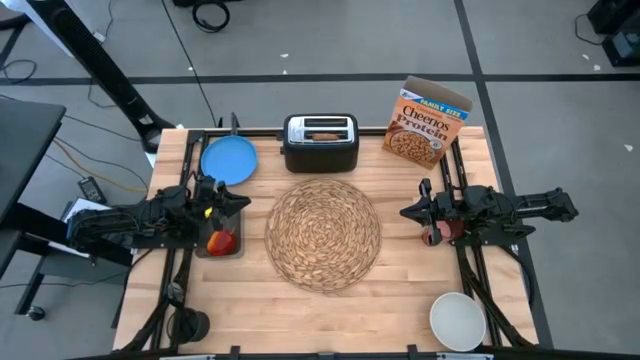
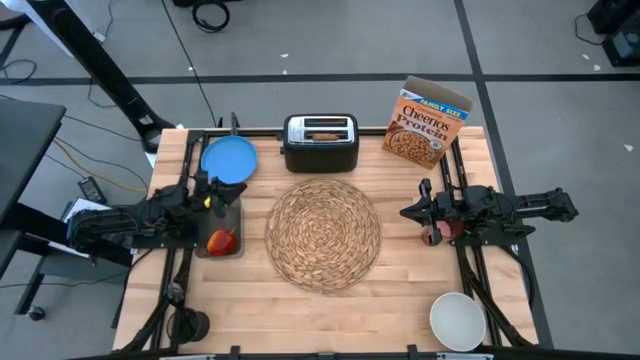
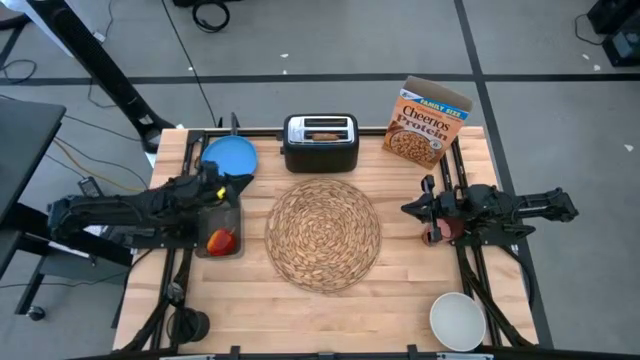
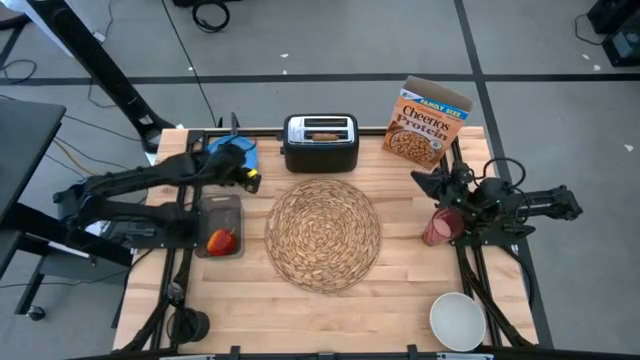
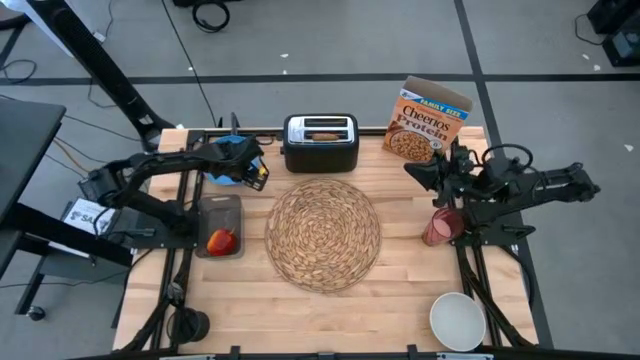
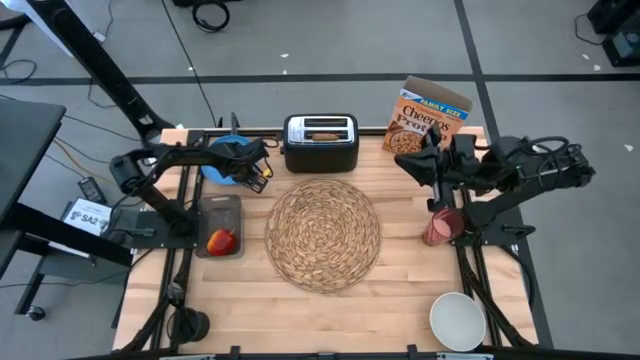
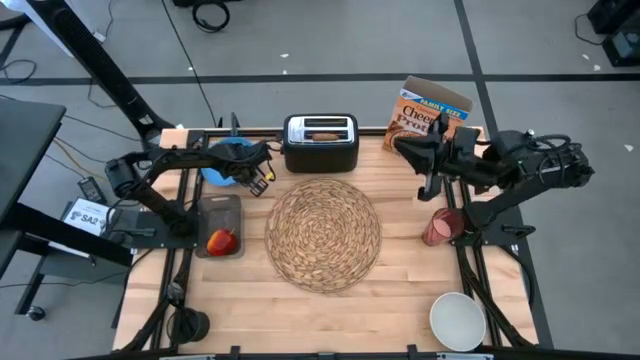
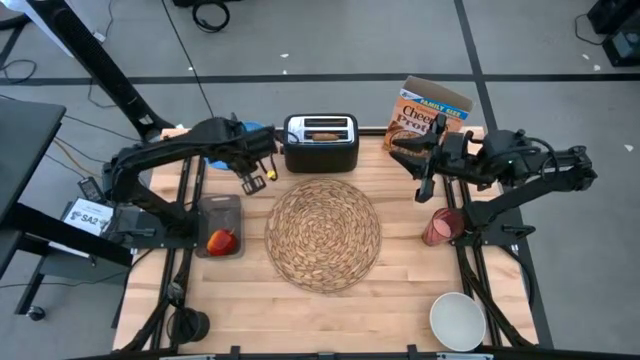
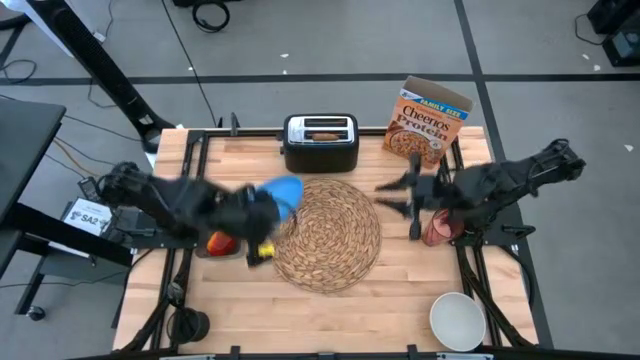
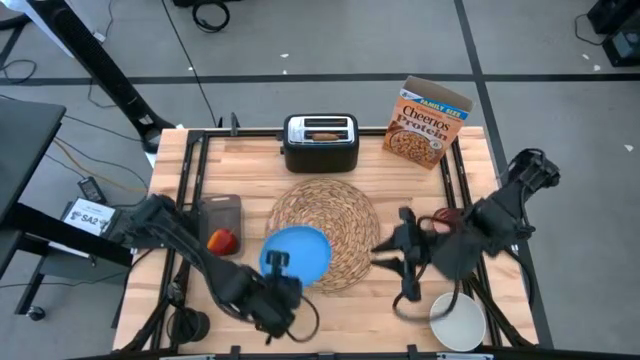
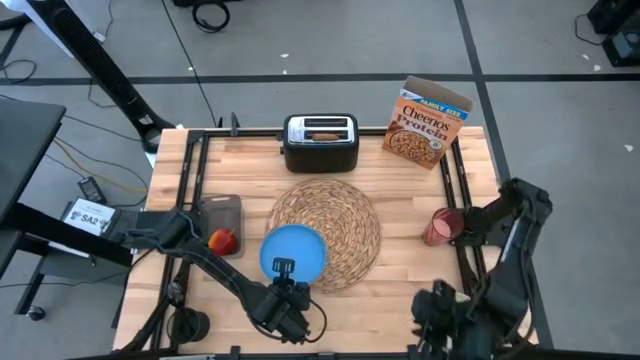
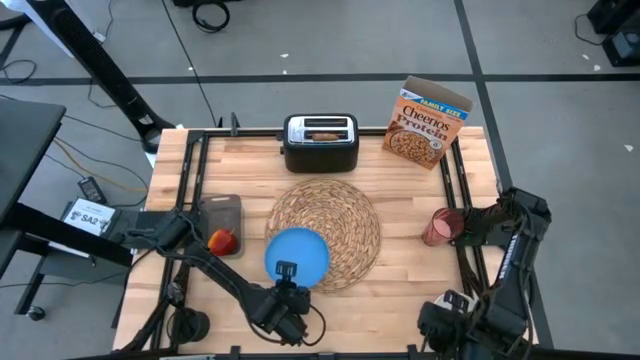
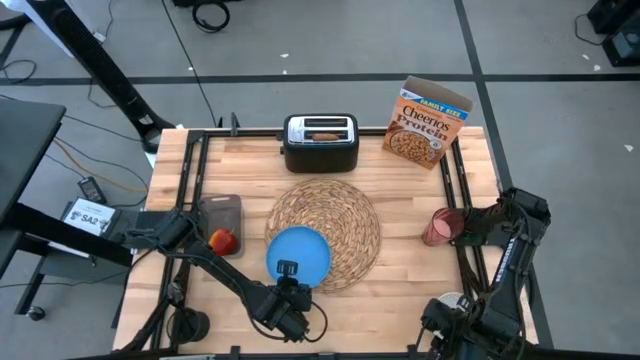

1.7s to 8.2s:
Task: Arrange a breakfast setting
Put the blue plate on the brown woven mat

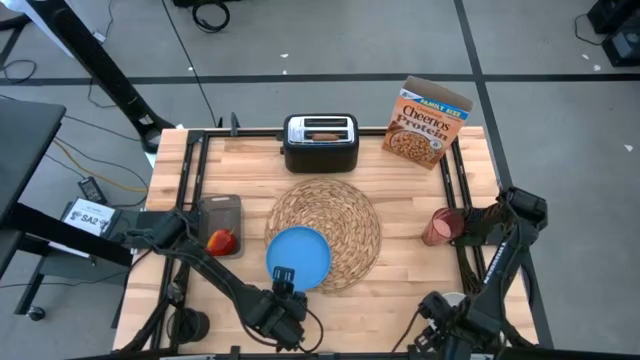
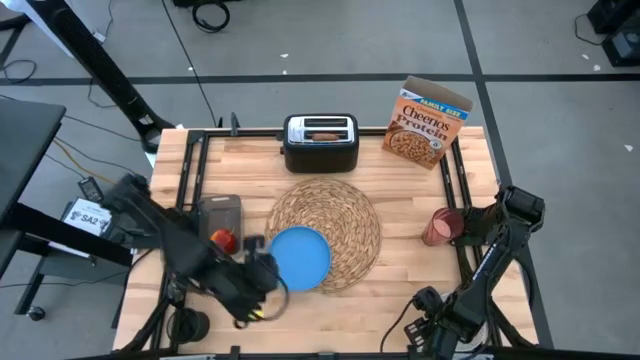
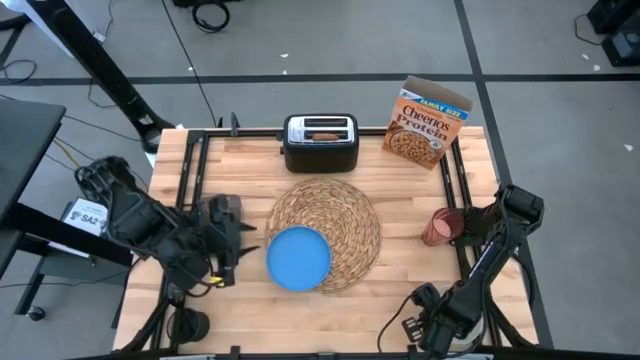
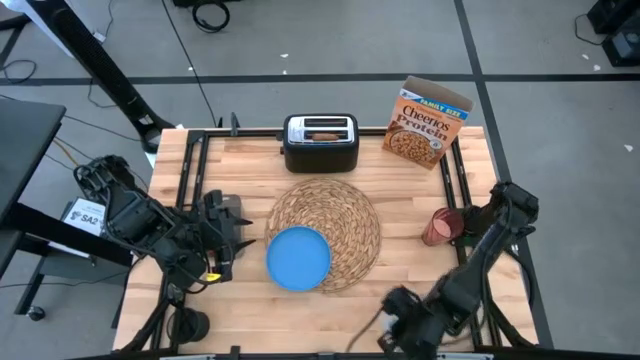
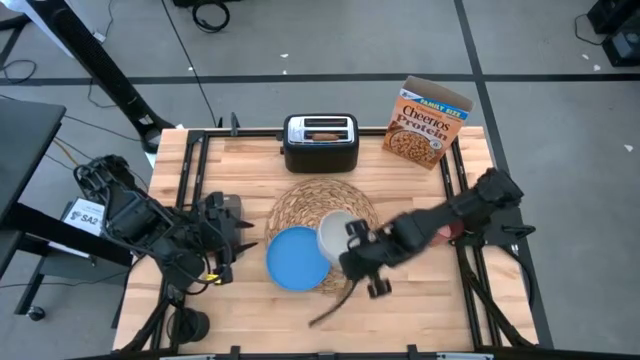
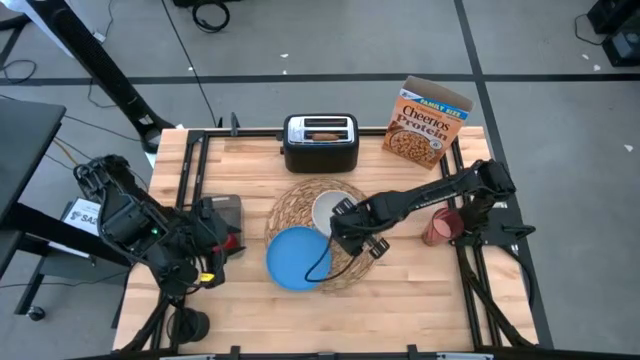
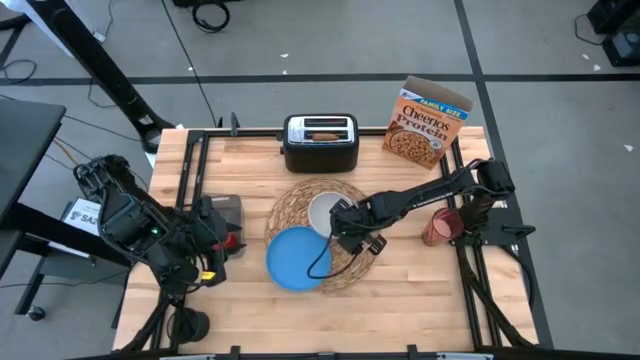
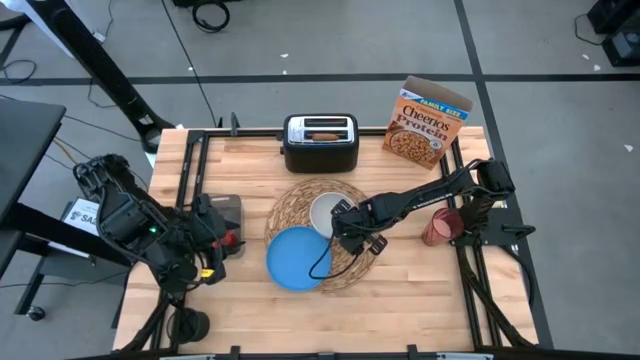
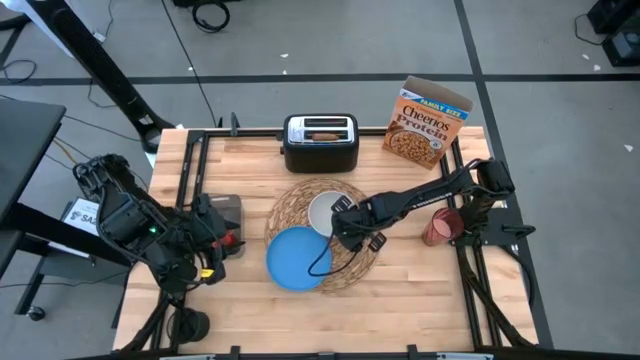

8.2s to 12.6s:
Put the white bowl to the top right of the blue plate on the brown woven mat

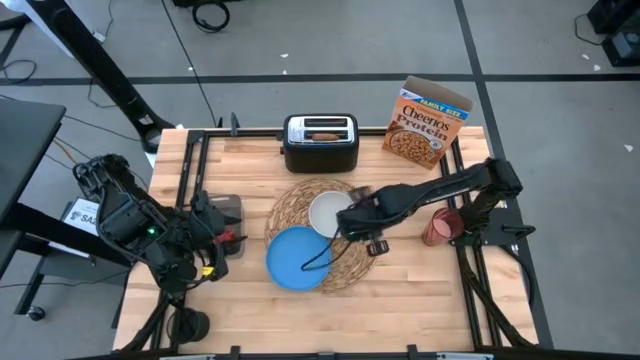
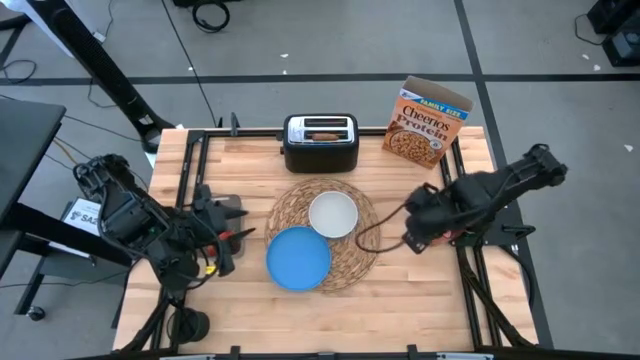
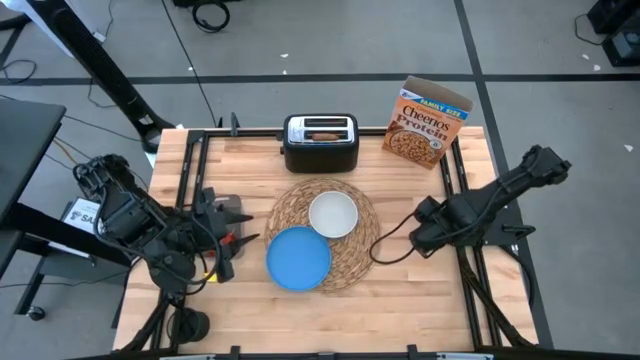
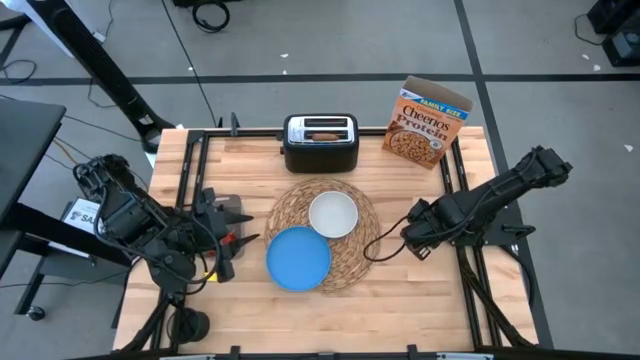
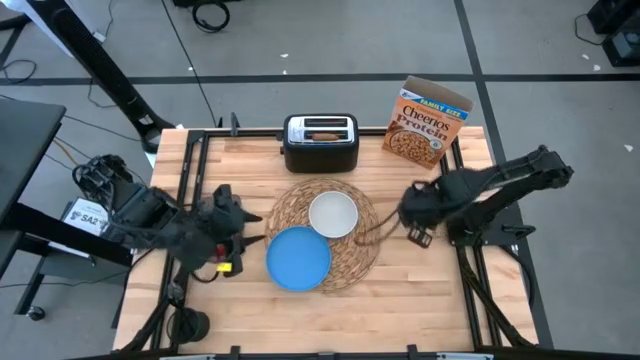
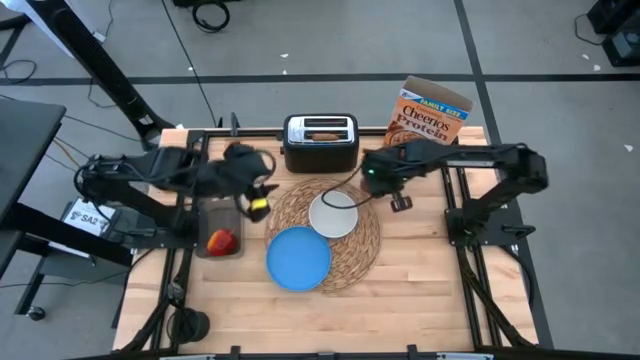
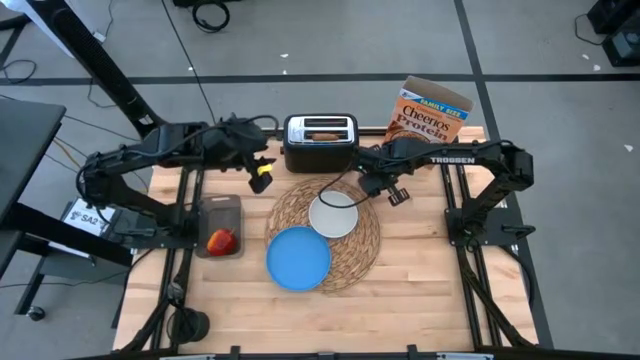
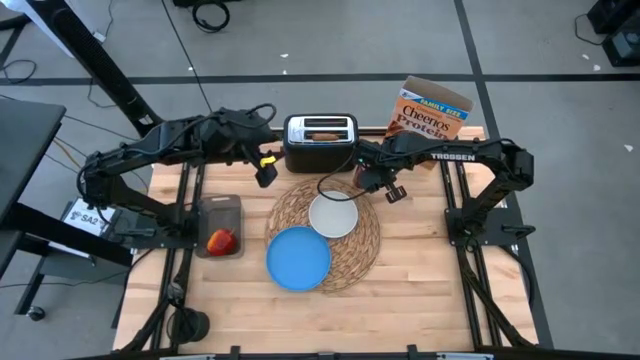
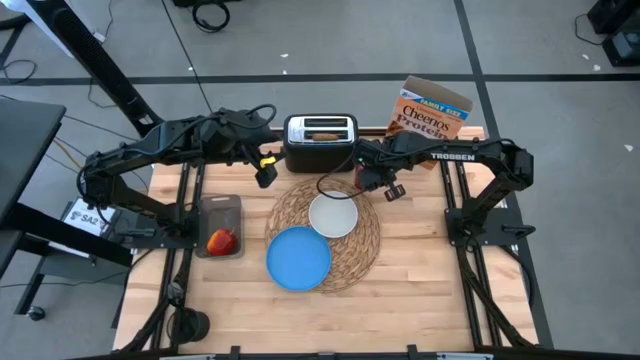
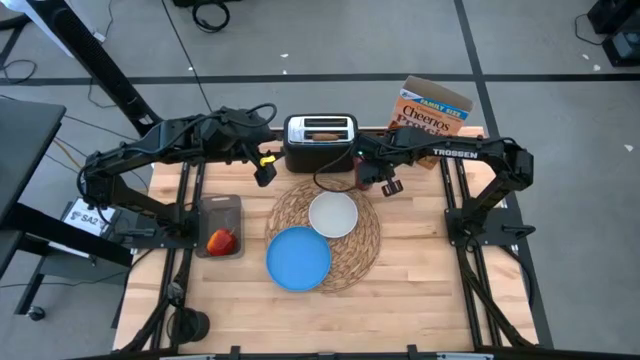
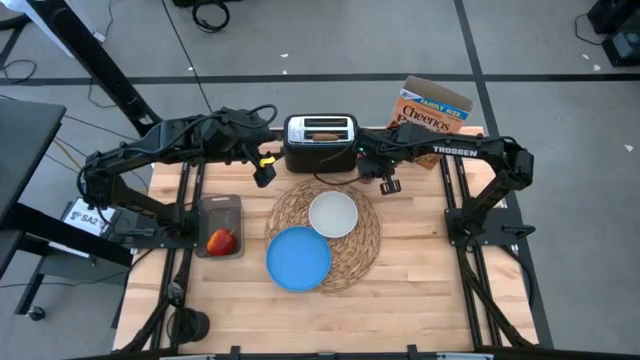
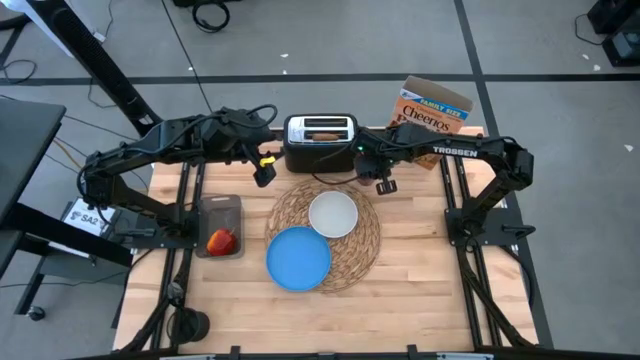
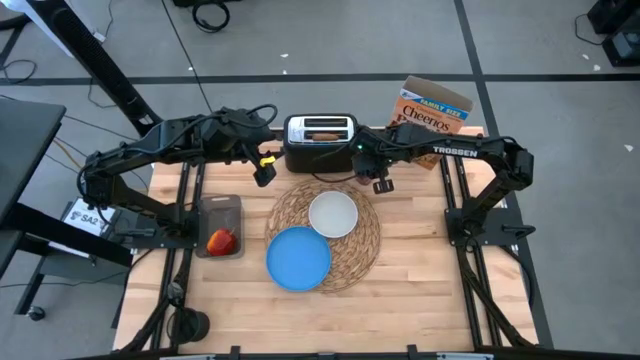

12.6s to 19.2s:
Move the red cup to the top right of the table

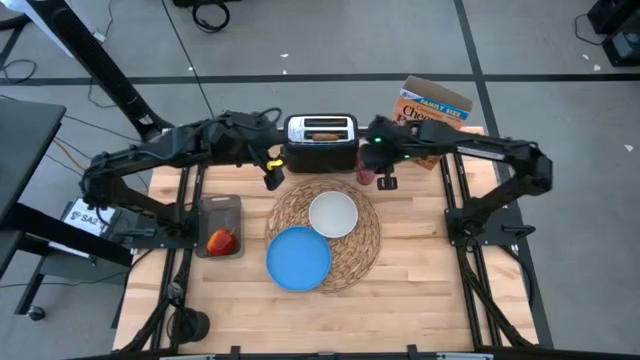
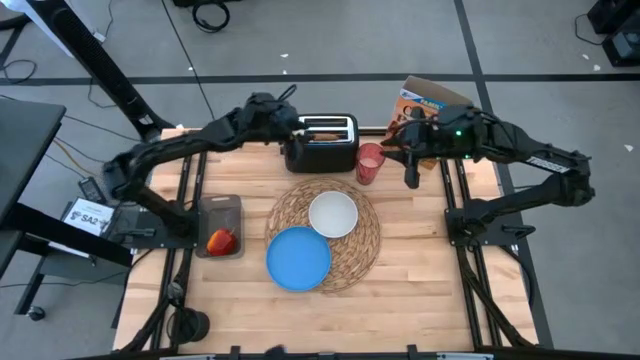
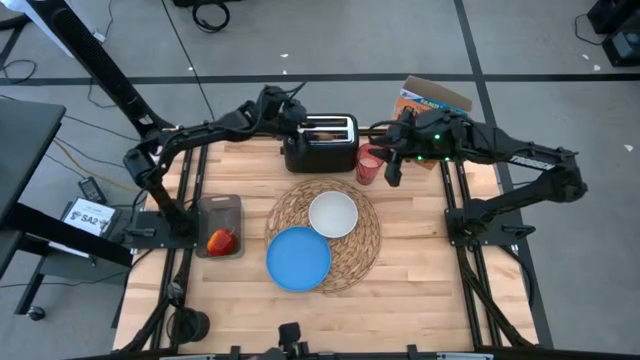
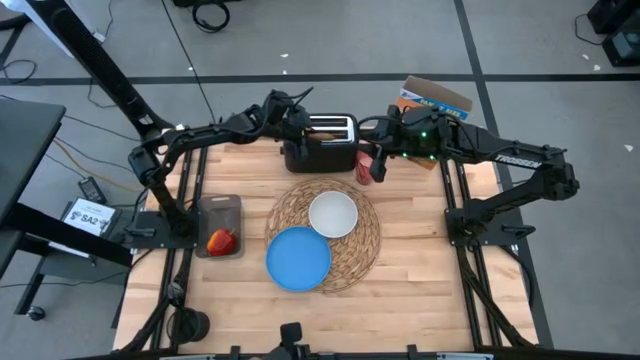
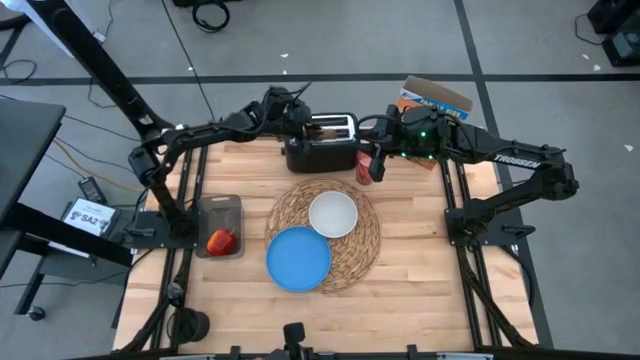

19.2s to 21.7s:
Put the brown toasted bread on the blue plate
